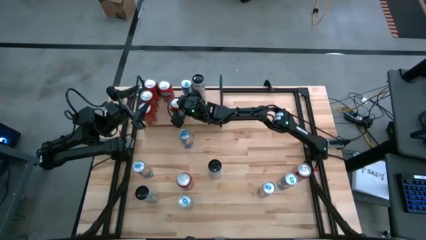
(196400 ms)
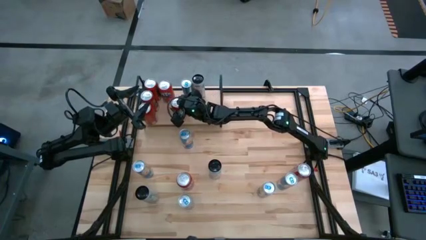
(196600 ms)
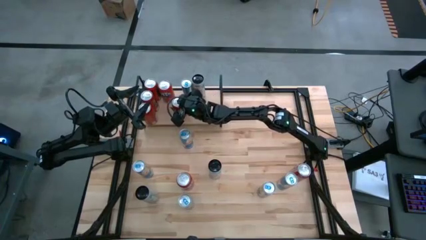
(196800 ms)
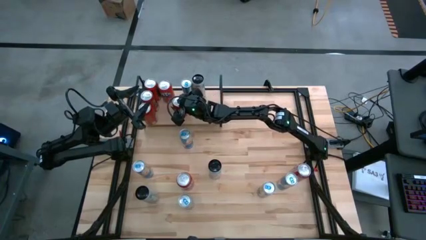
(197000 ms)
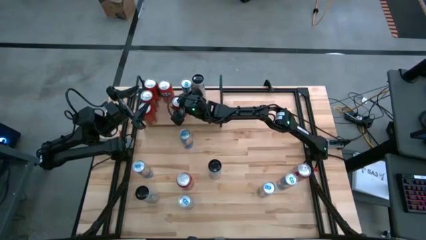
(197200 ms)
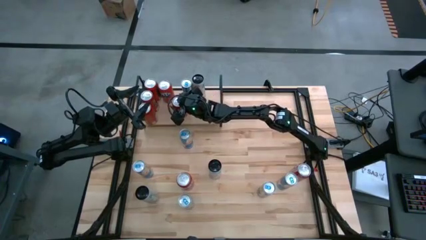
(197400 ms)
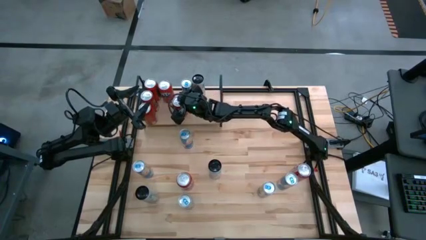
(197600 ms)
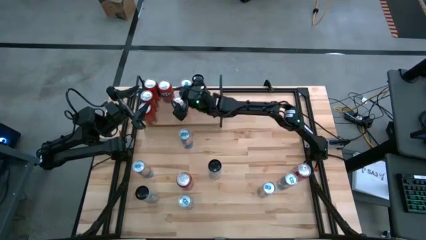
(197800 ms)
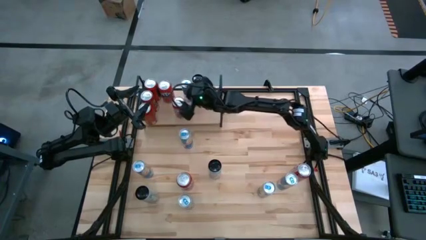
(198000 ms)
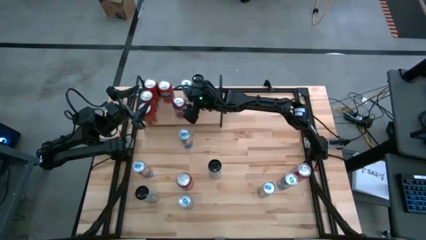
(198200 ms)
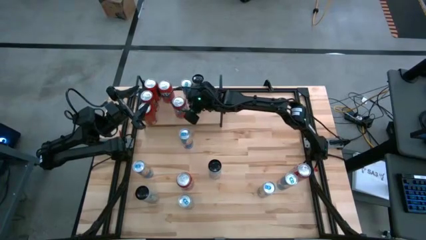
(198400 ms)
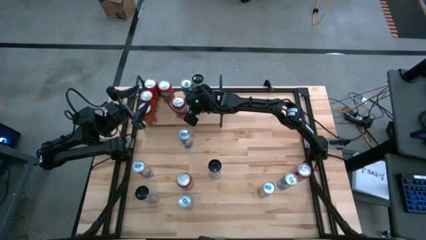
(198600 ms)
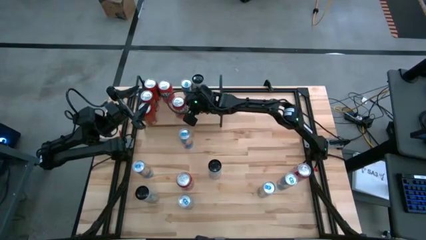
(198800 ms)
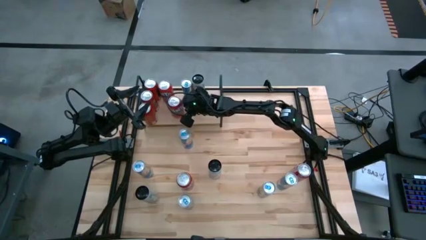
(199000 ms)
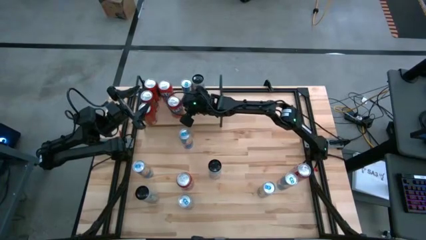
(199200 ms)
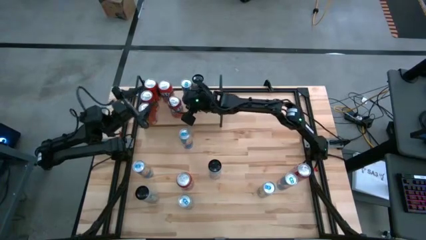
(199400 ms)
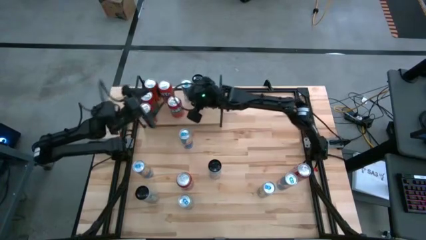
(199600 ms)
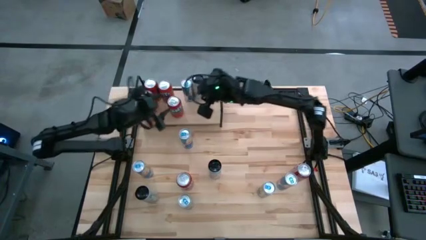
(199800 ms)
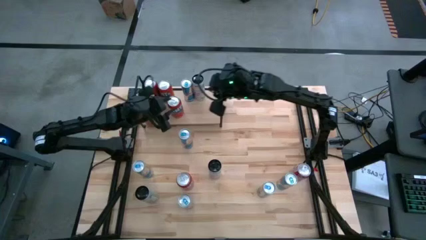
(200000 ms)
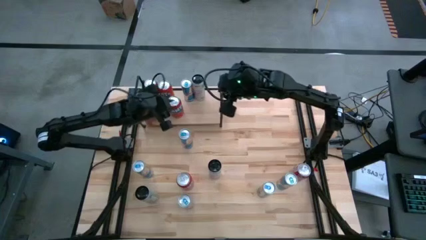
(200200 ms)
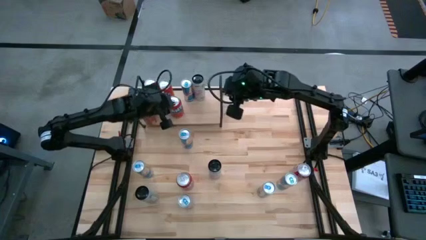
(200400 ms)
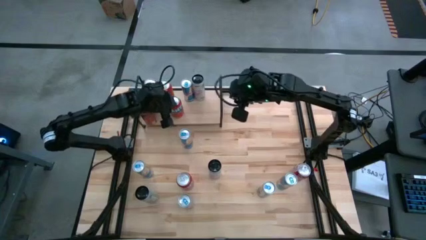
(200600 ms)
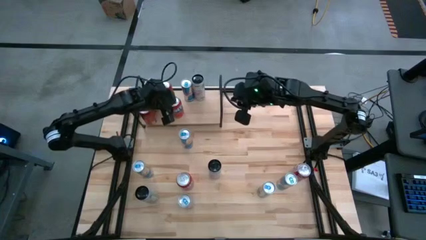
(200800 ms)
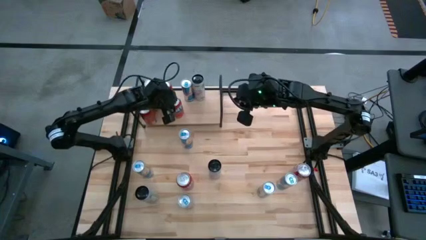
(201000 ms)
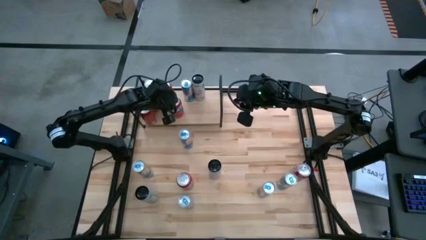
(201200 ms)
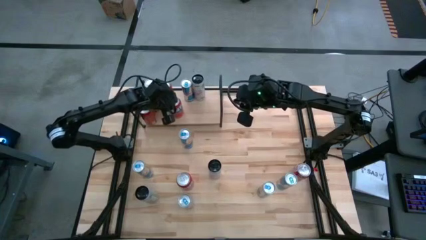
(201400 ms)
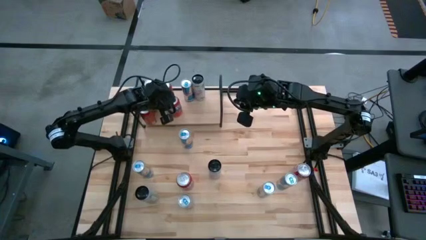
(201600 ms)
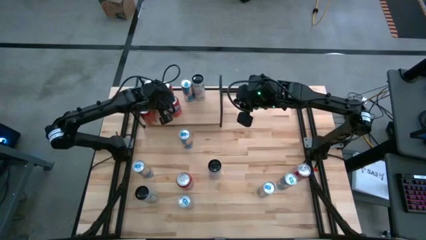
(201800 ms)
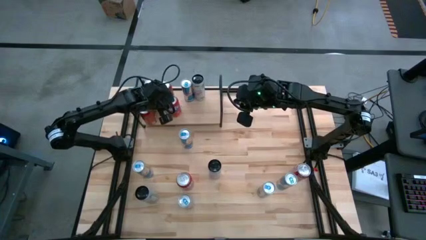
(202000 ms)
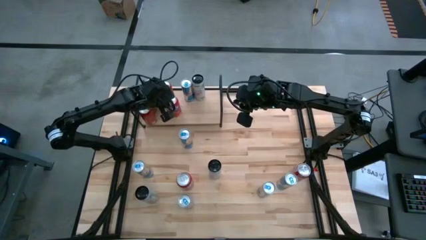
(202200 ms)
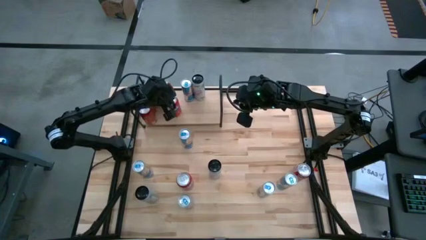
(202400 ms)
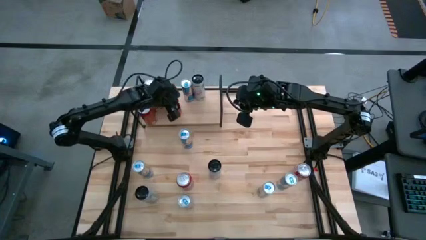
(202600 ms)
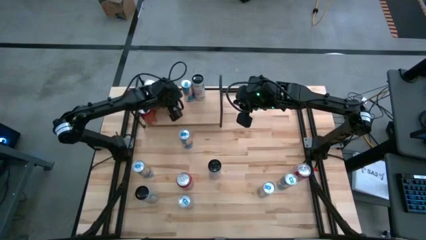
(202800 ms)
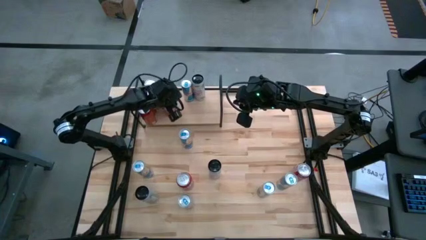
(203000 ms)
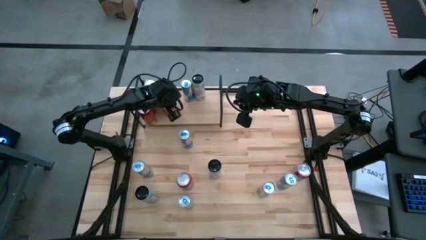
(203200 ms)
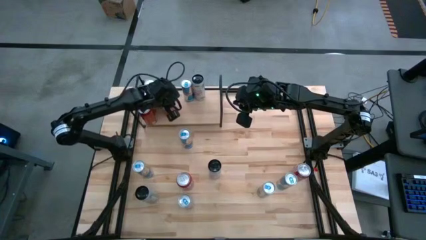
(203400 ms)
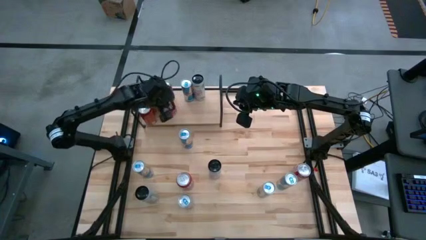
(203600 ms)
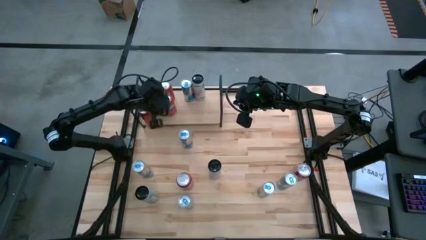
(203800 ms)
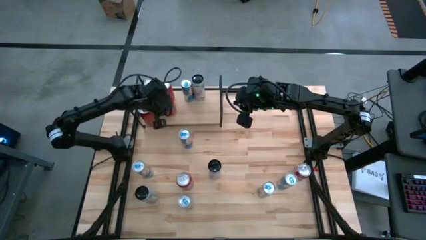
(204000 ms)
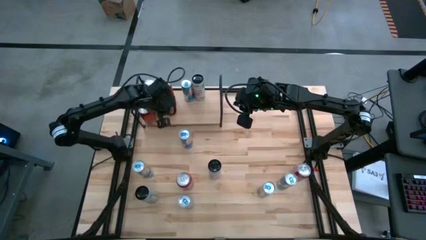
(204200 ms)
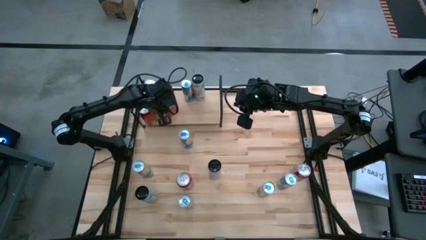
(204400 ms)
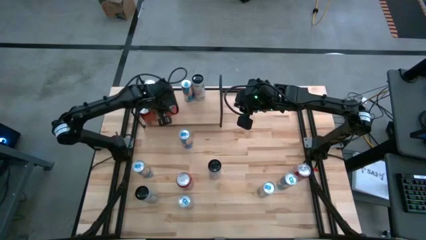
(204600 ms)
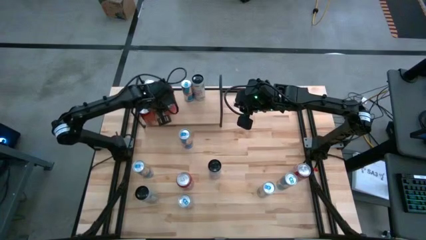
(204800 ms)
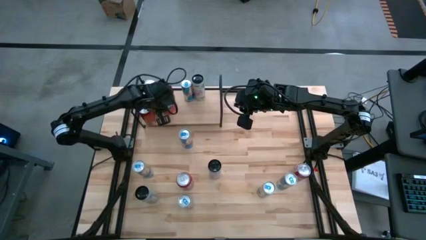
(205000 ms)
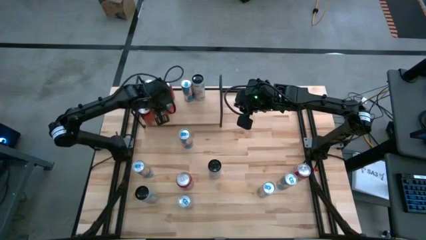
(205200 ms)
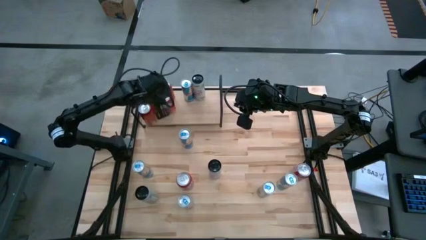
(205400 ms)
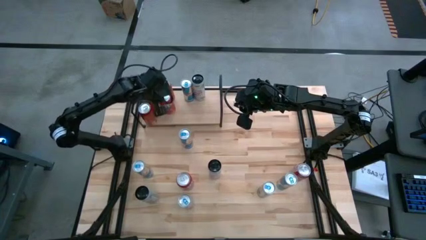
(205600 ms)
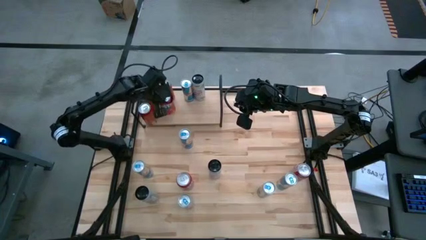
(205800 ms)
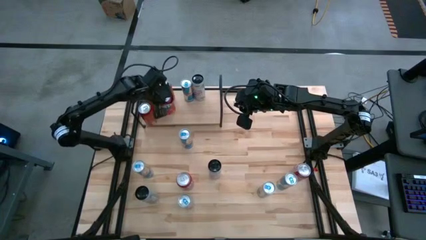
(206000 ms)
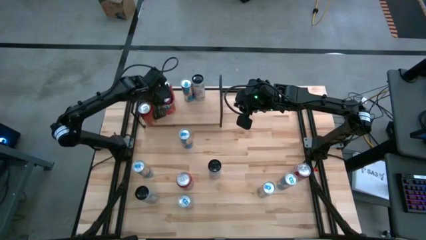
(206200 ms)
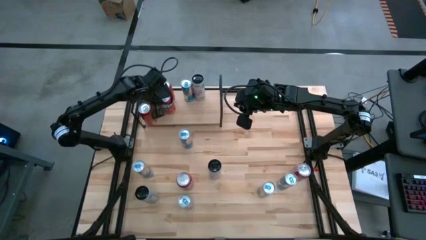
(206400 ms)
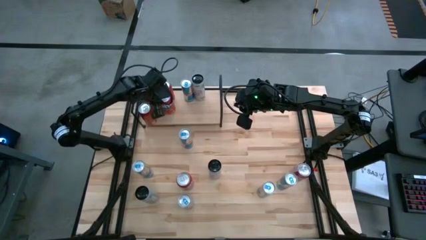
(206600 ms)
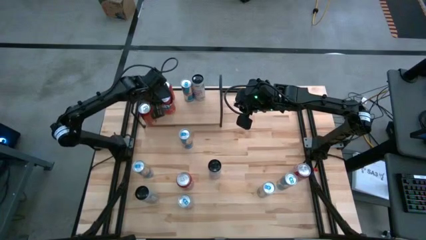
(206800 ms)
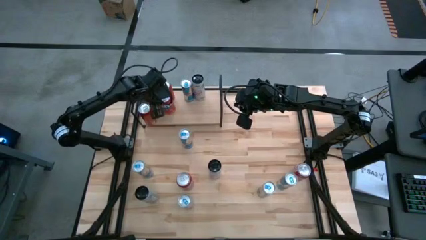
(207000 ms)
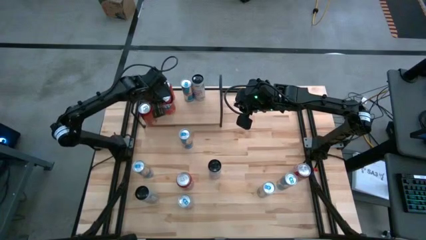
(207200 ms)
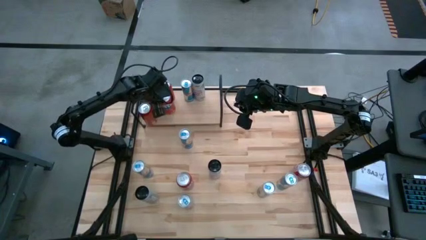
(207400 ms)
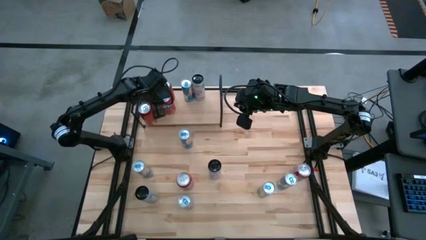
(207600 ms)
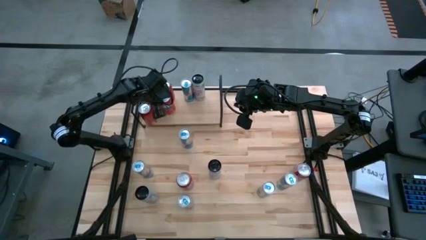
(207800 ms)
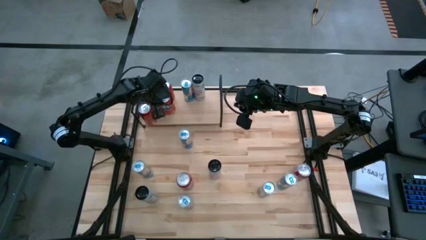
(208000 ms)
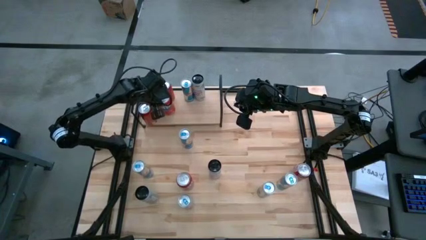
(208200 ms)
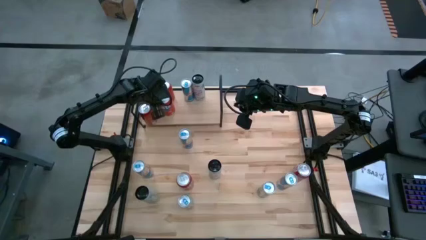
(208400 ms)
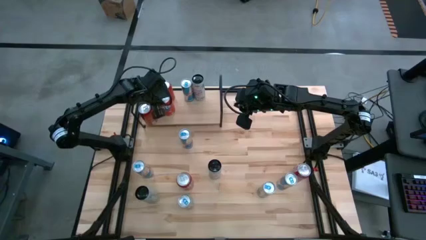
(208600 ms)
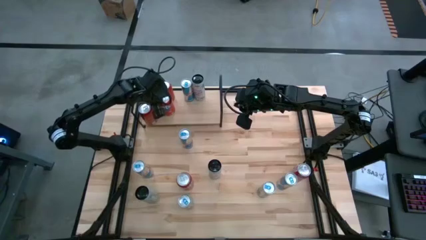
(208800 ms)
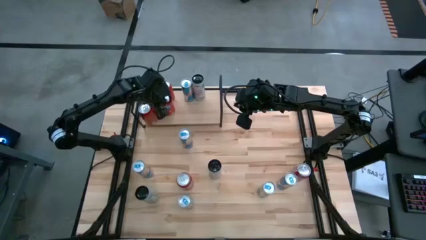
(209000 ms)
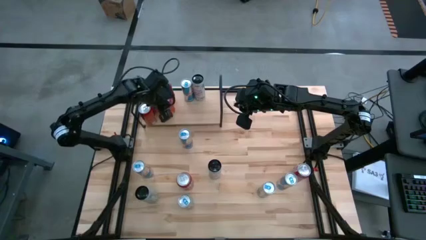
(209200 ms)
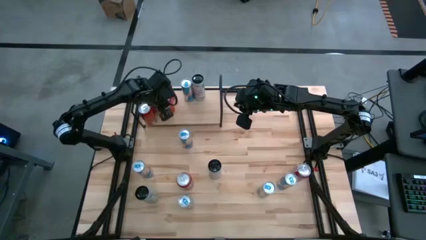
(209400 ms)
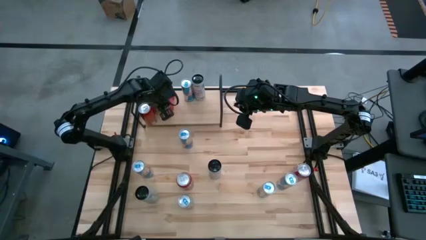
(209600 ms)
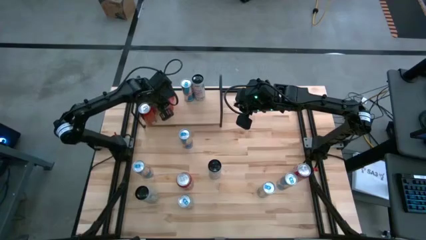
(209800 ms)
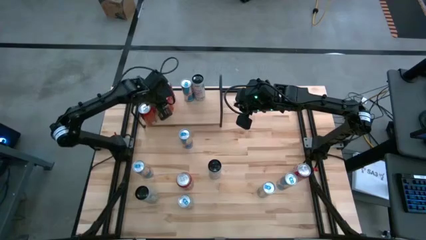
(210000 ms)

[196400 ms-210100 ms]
Task: Place canned beverage on shelf
Put the red soda can on the shelf aligned with the other red soda can
